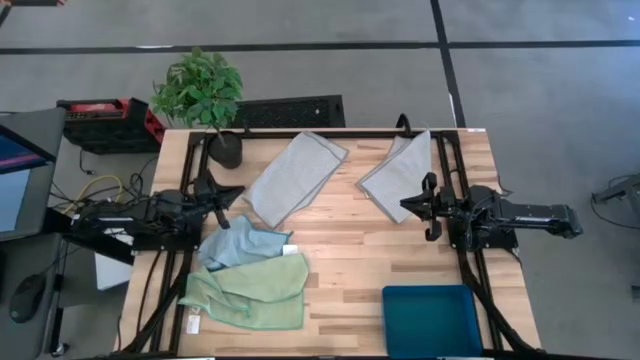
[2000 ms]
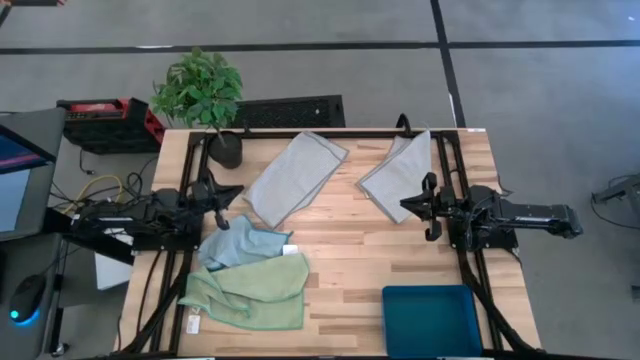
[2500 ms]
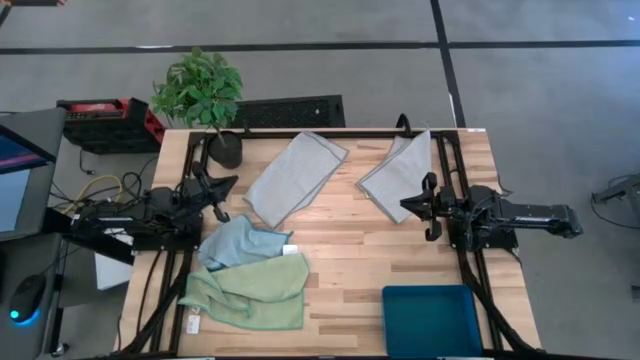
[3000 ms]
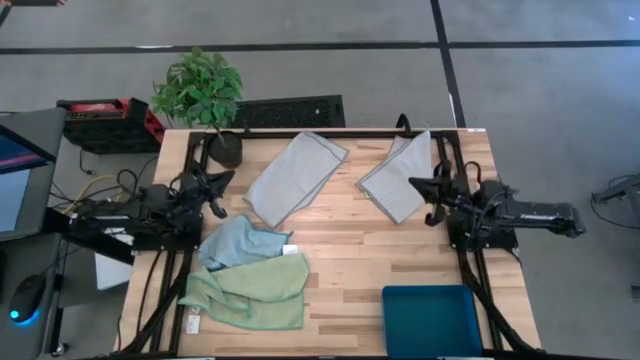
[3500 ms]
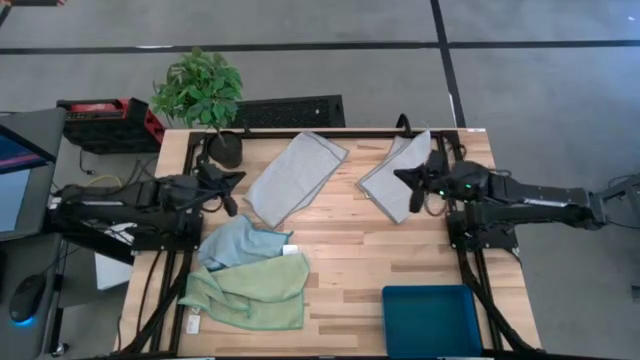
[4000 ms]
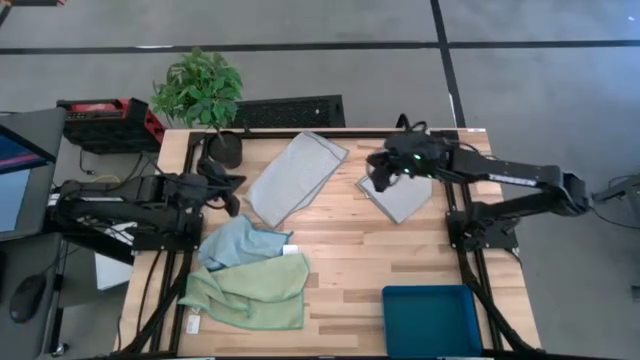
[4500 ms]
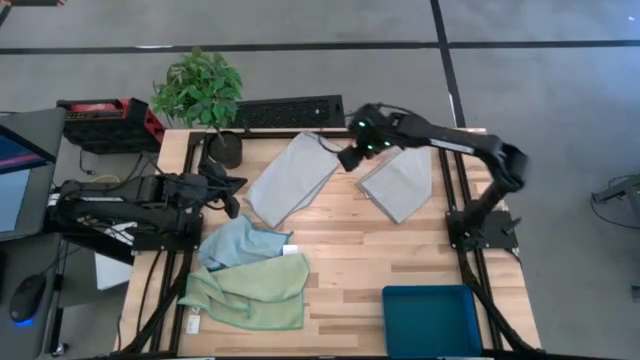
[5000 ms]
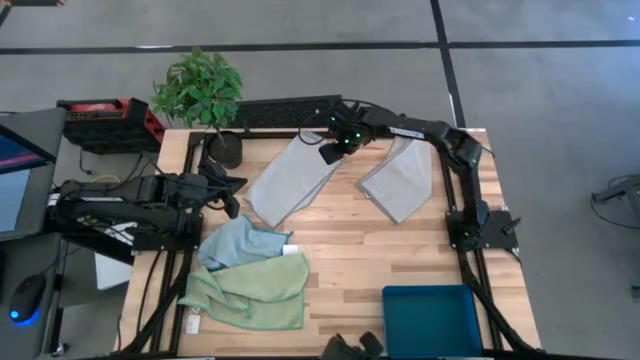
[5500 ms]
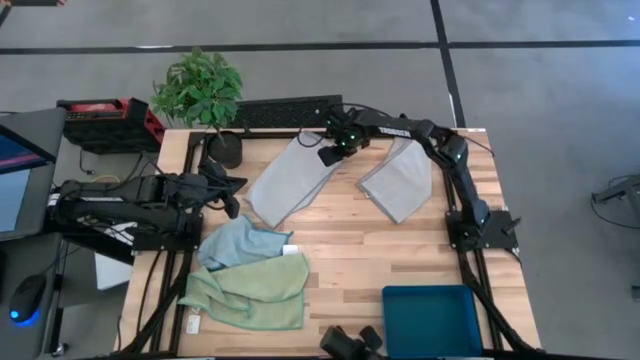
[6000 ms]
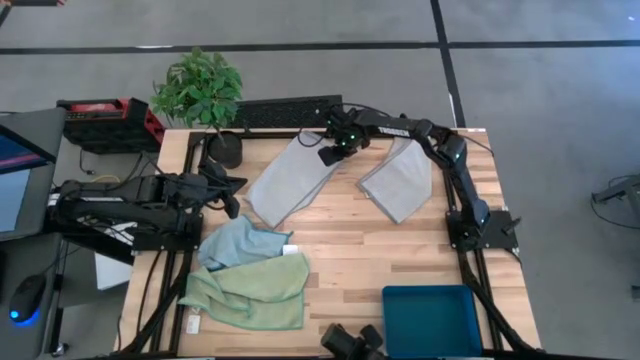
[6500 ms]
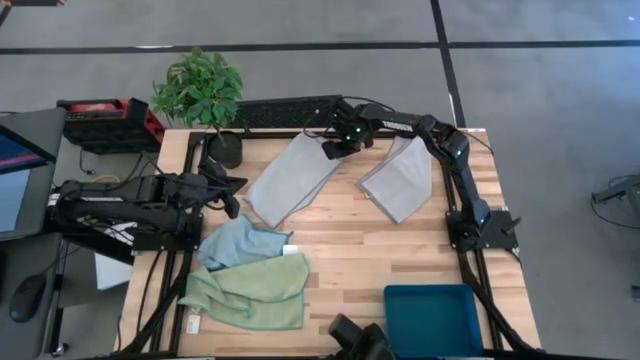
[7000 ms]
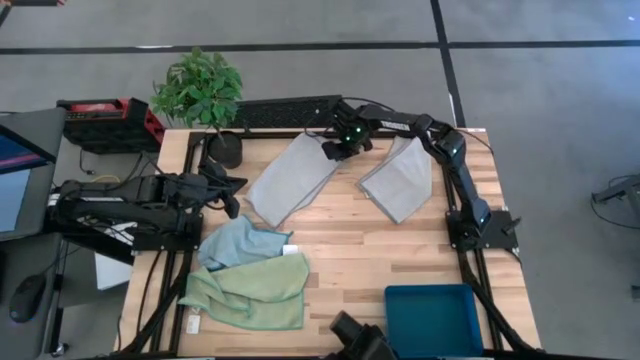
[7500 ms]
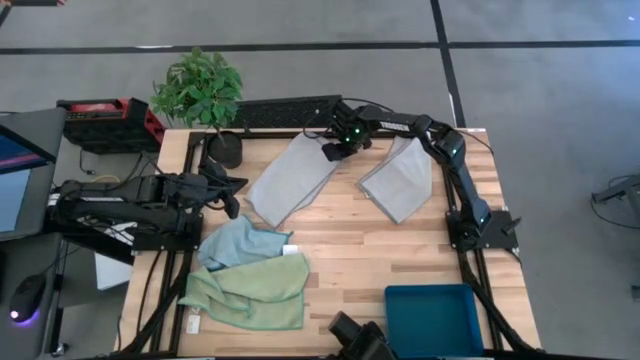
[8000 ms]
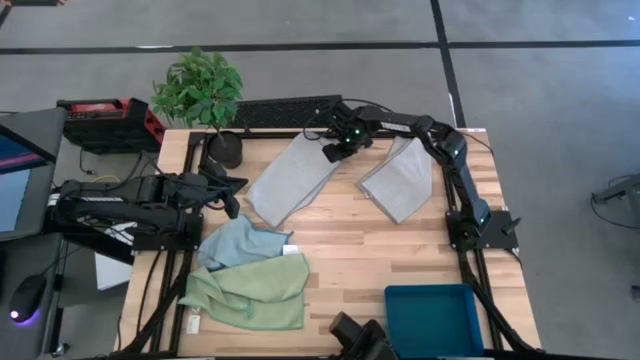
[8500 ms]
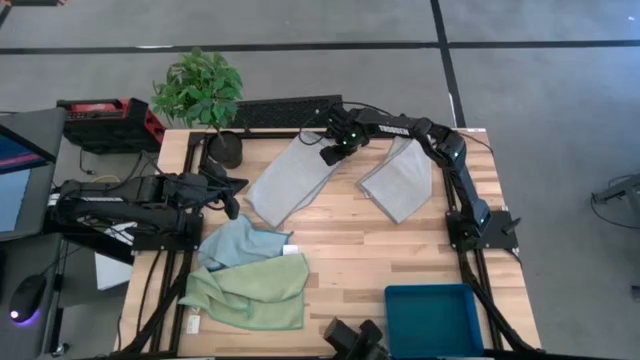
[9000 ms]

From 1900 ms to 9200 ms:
Task: Fold microfiber towels
Fold the left gray microfiber towel

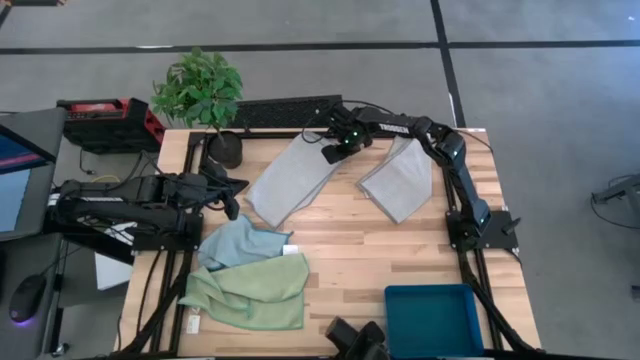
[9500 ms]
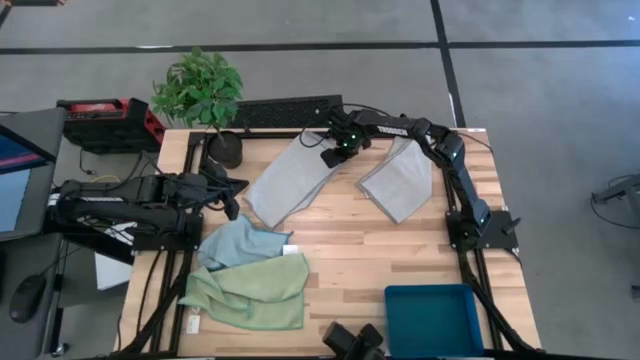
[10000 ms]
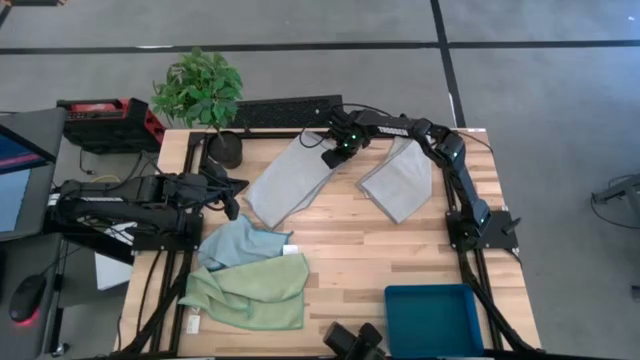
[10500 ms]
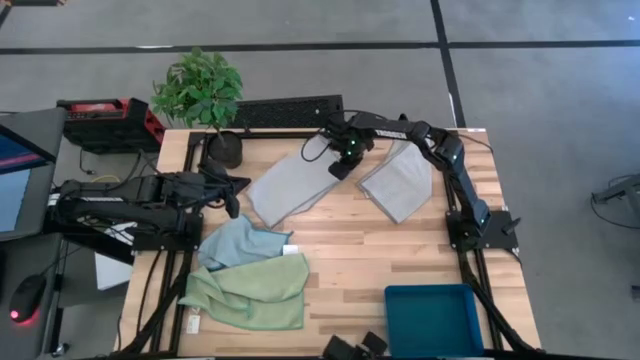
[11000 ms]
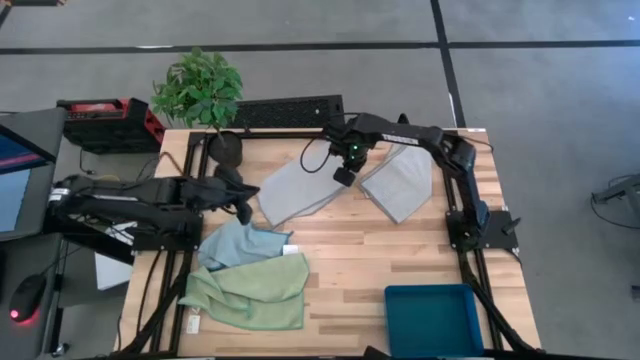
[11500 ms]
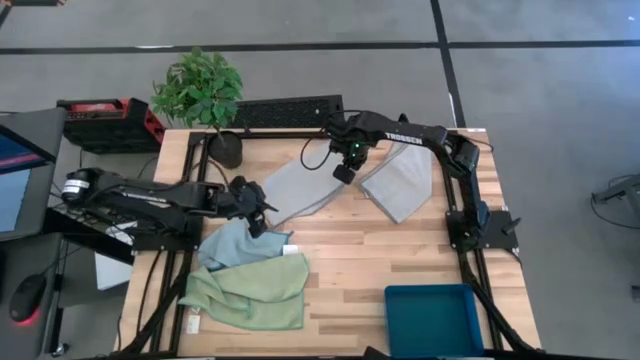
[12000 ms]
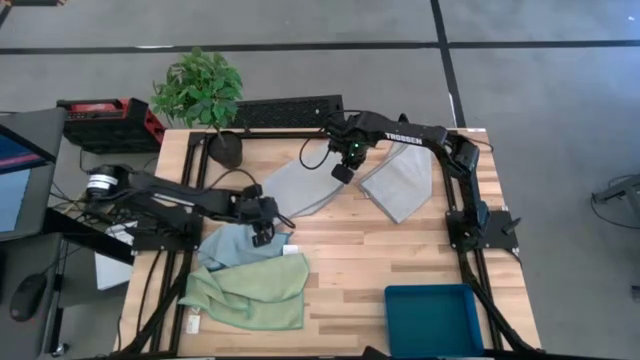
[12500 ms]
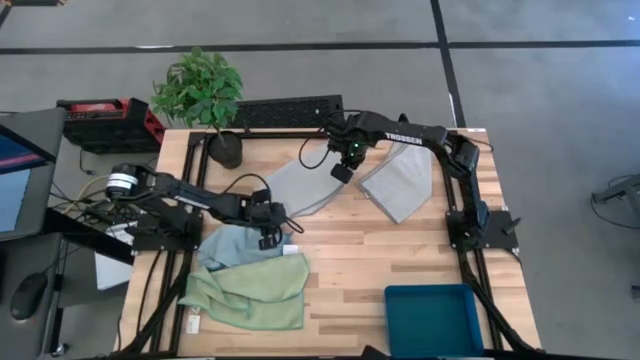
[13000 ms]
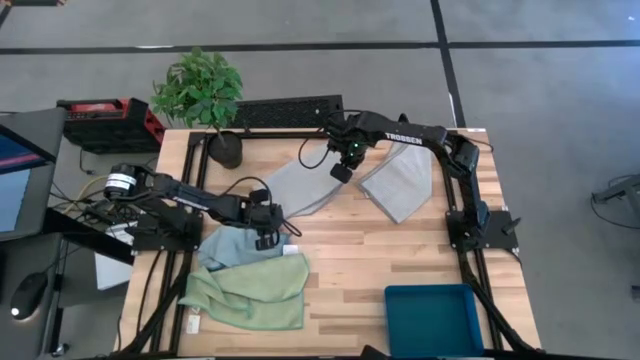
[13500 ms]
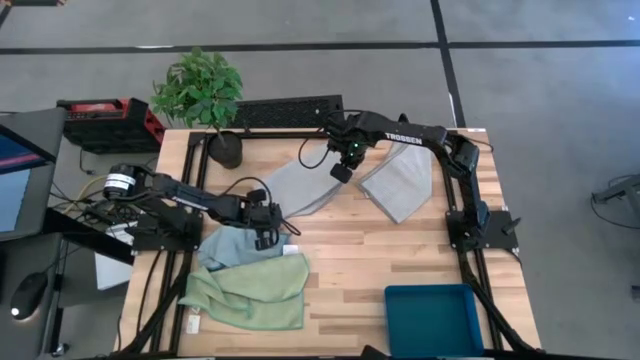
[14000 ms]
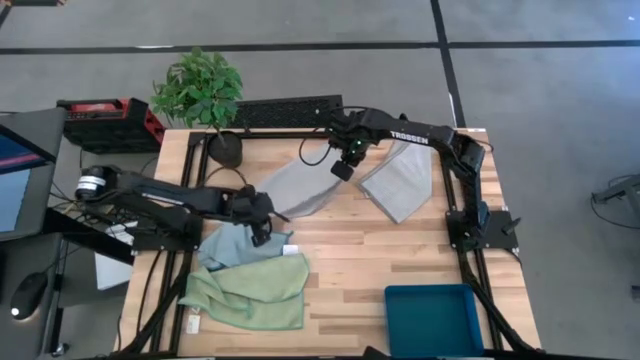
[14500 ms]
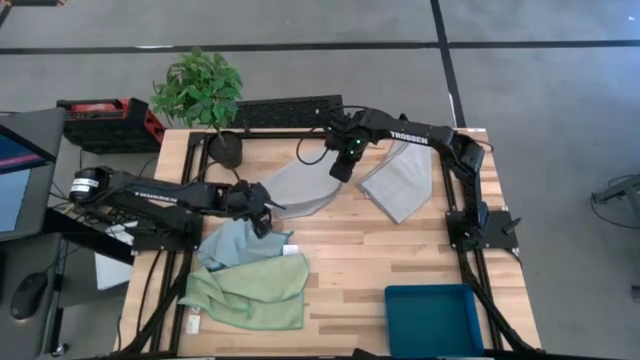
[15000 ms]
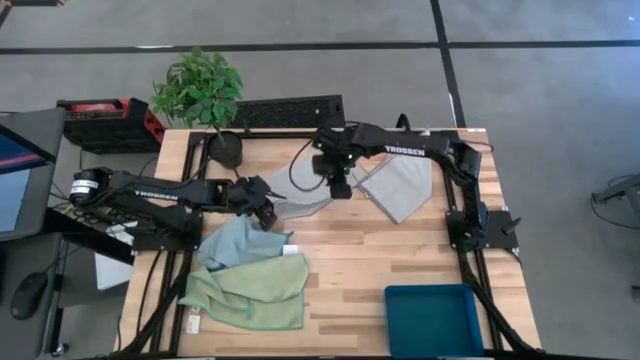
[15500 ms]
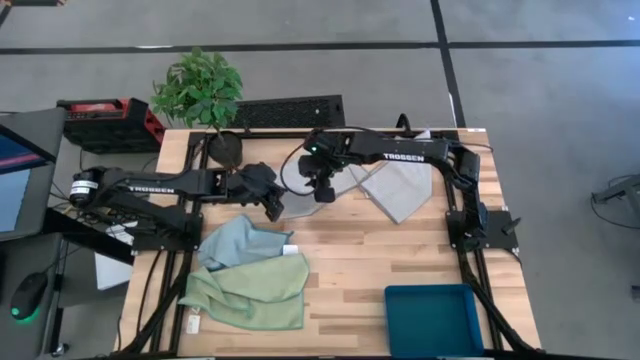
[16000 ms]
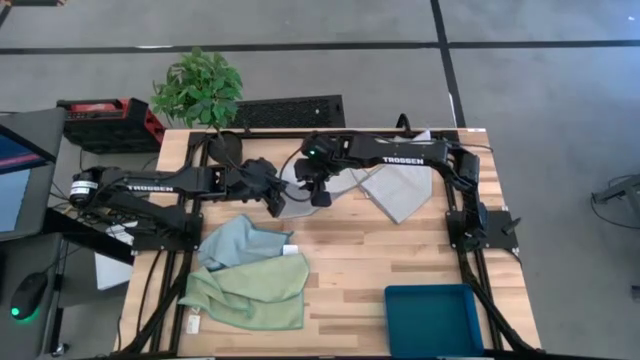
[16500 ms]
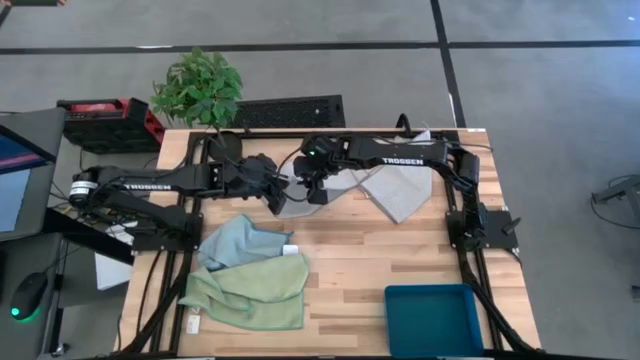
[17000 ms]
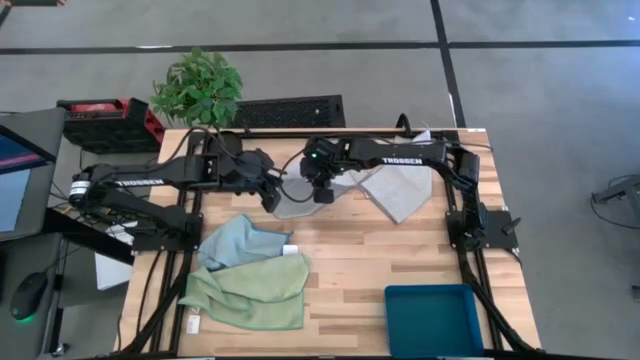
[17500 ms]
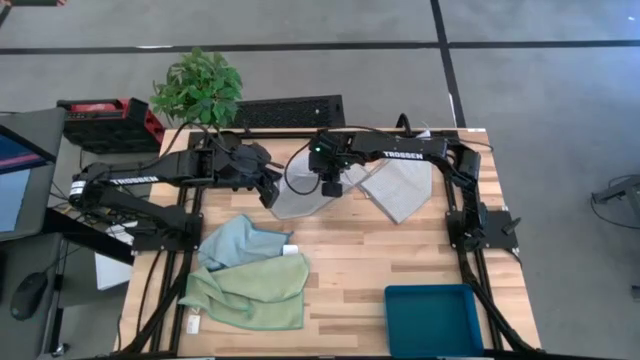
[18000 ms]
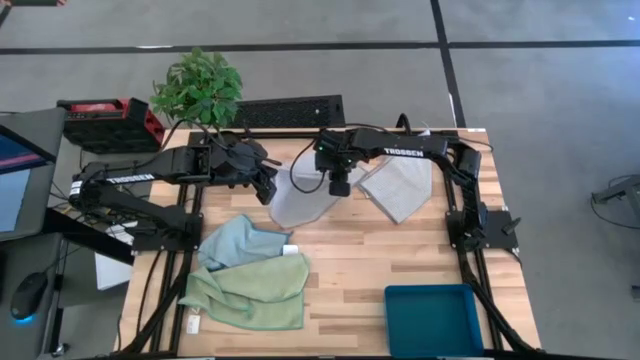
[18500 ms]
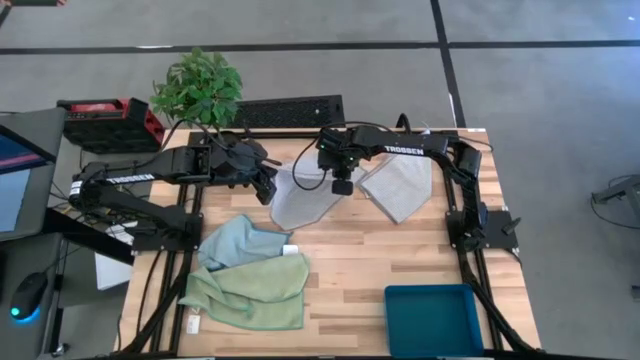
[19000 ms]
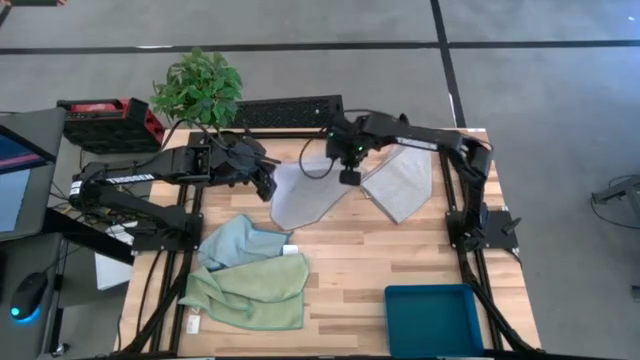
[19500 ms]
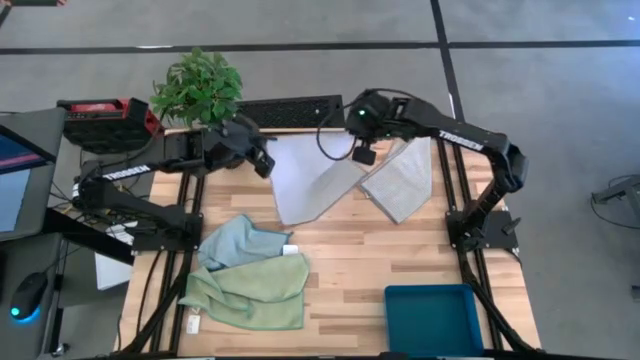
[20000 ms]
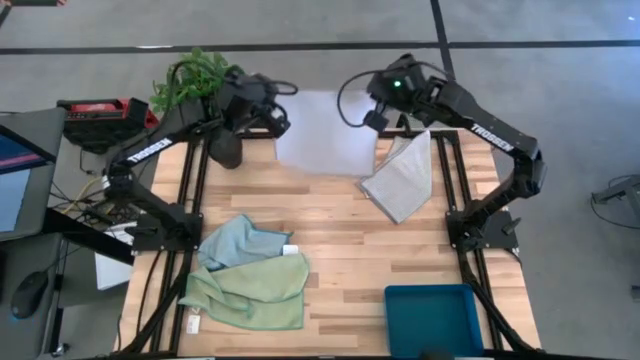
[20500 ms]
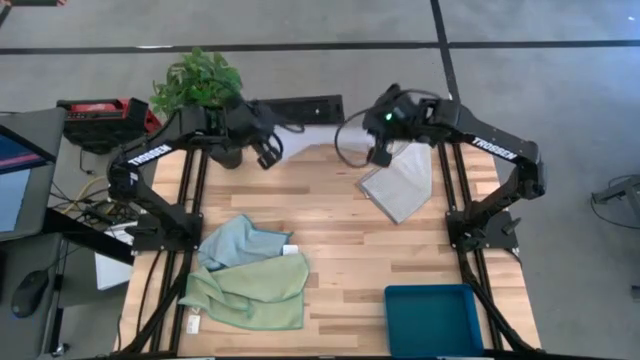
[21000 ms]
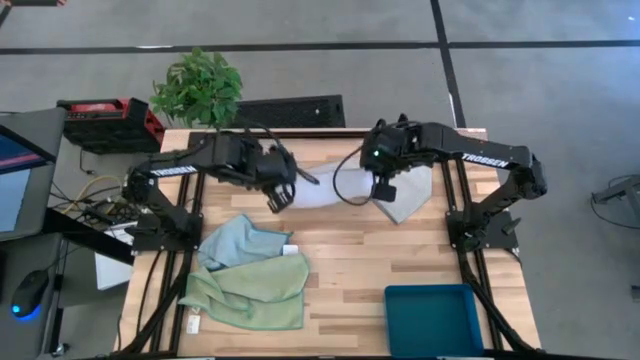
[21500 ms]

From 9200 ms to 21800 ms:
Fold the left gray microfiber towel

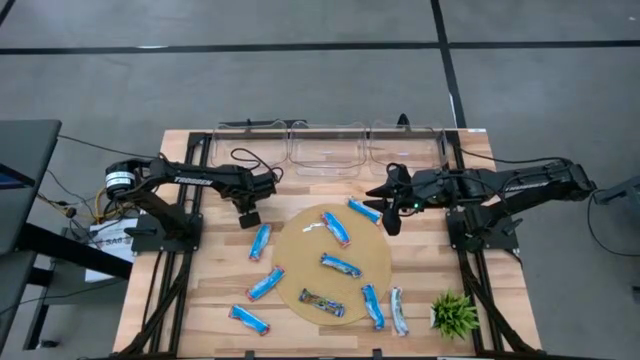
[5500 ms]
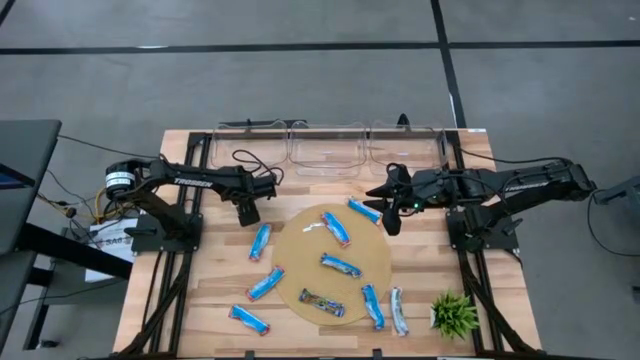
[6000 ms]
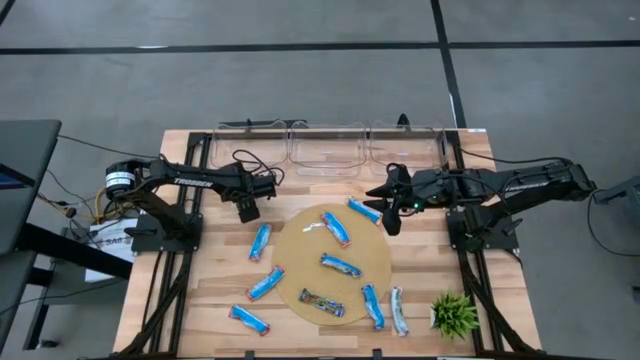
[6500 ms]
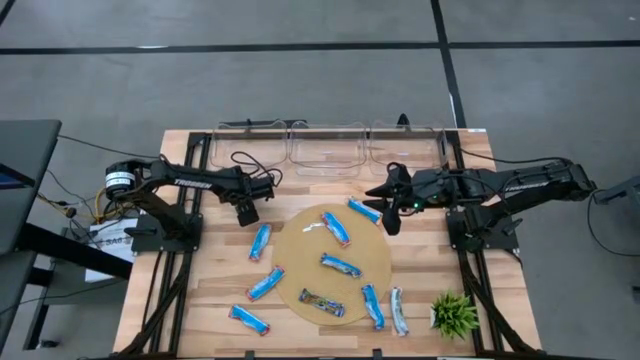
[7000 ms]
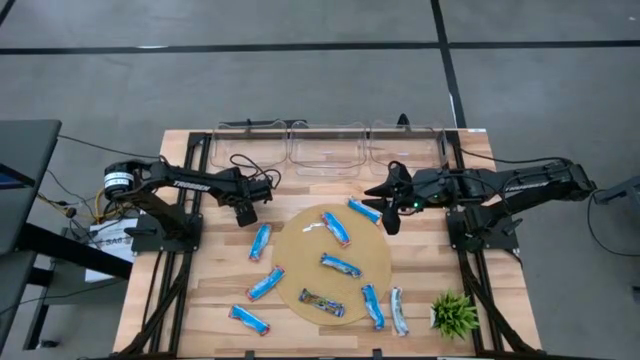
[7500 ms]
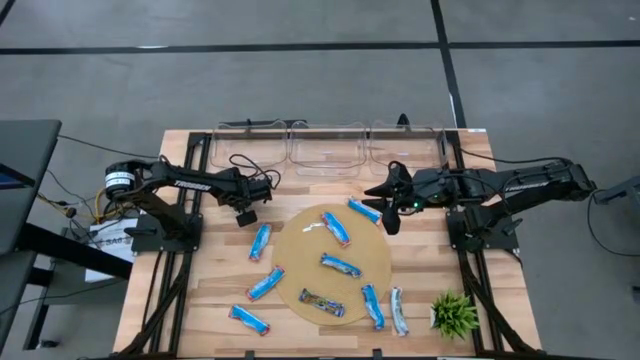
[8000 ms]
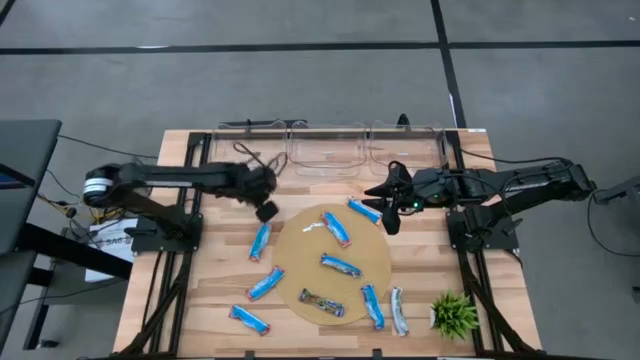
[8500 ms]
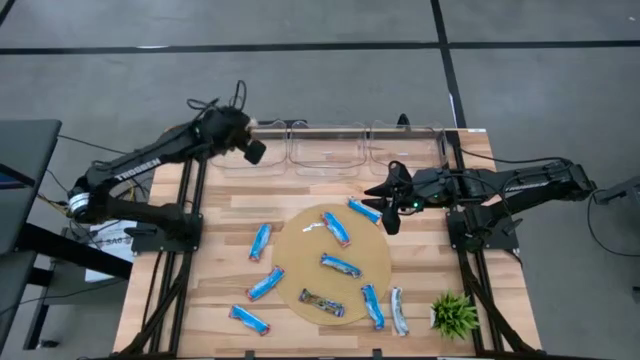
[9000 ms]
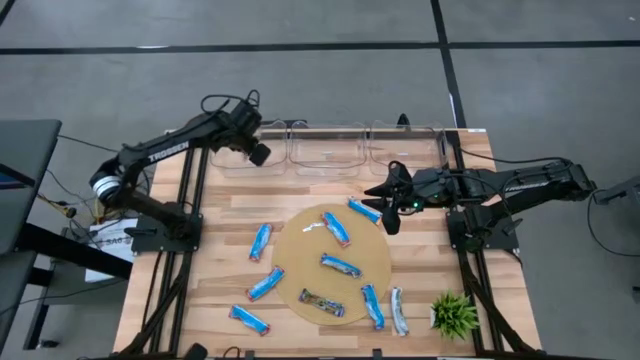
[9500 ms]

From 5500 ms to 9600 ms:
Task: Pick and place Granola Bars by type
Put the yellow granola bar into the top left transparent bin
